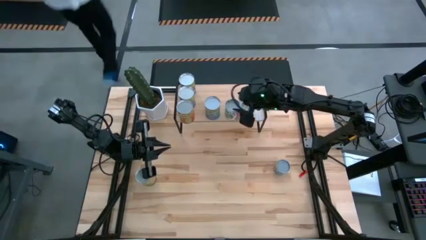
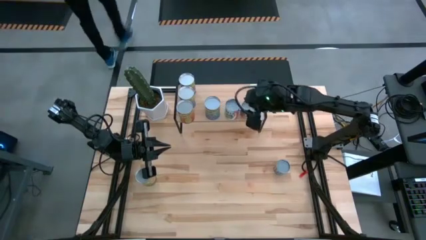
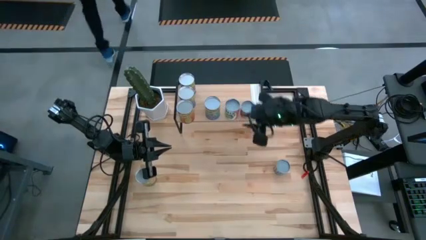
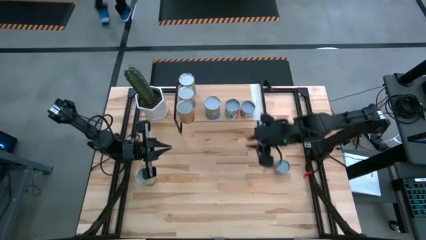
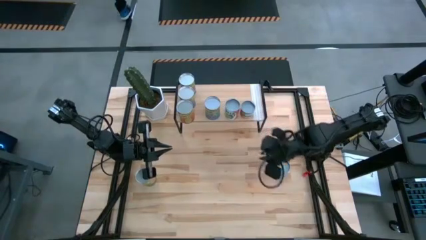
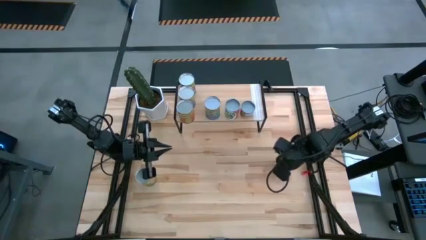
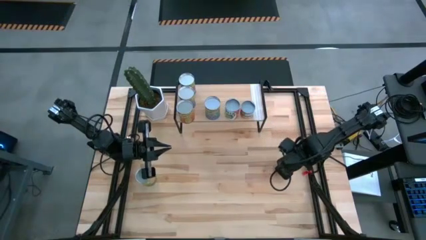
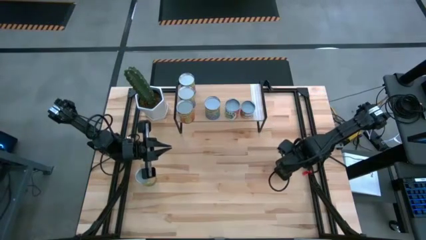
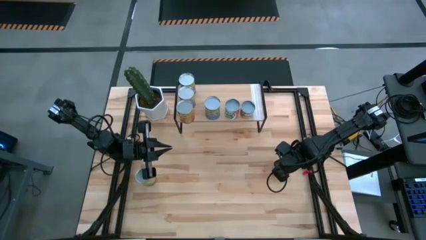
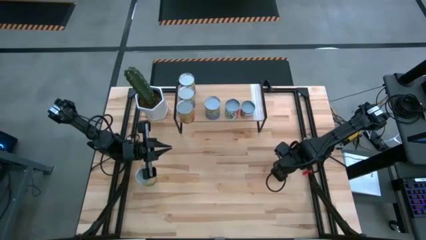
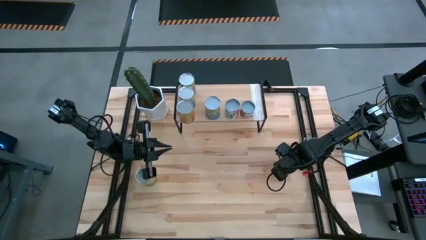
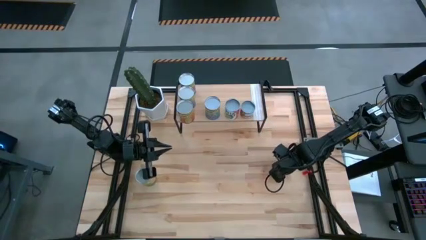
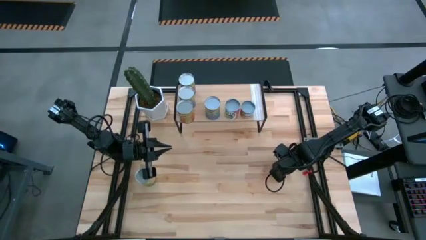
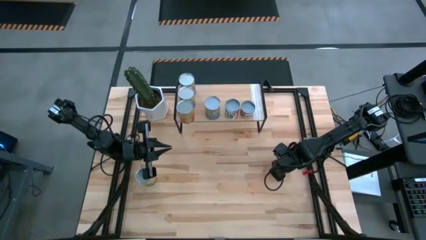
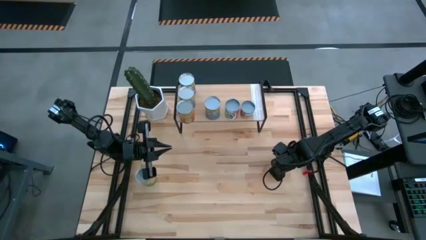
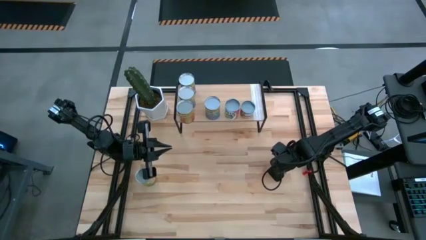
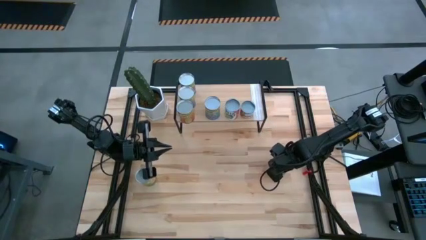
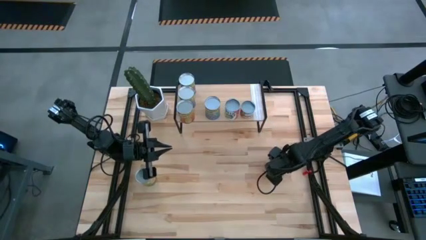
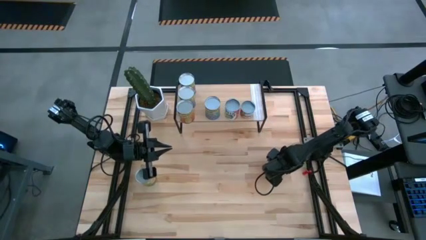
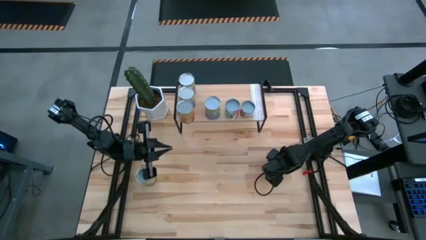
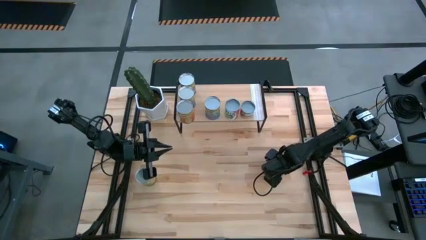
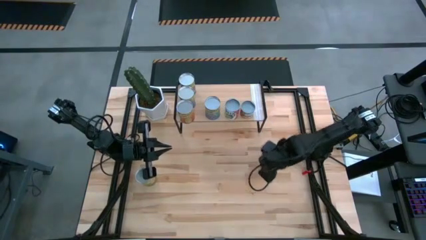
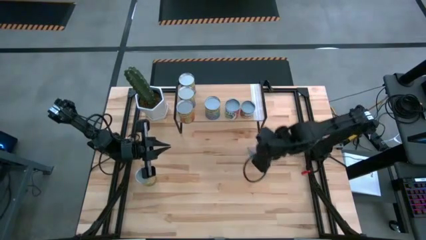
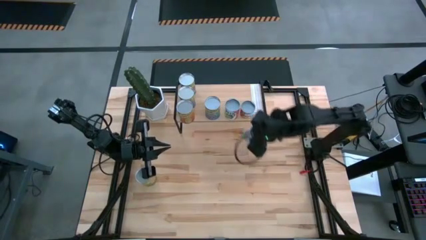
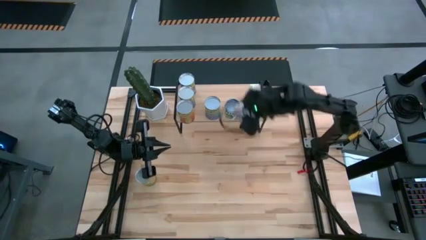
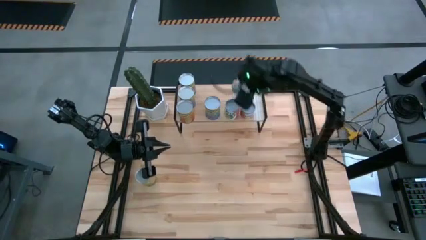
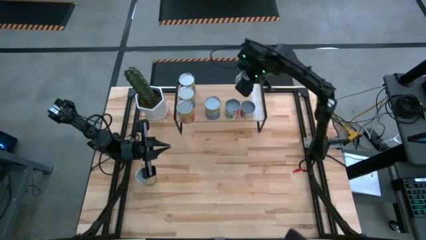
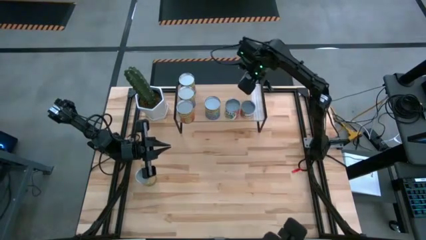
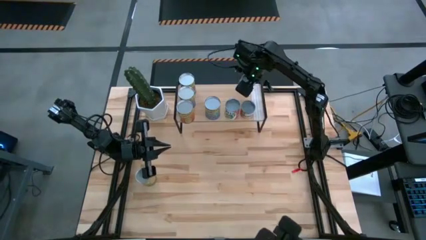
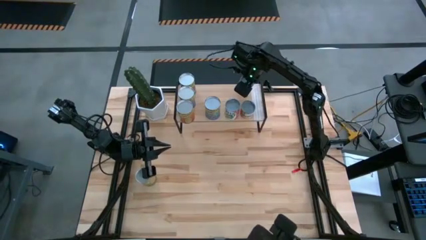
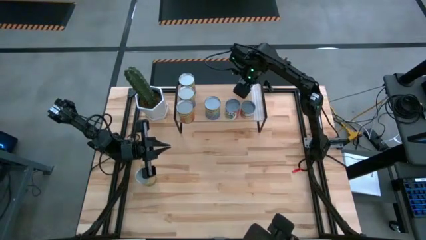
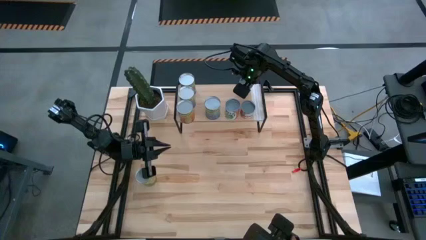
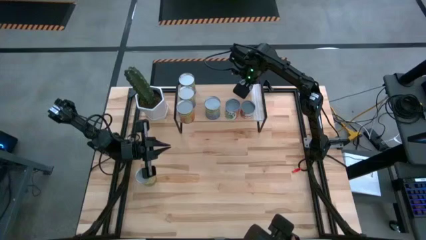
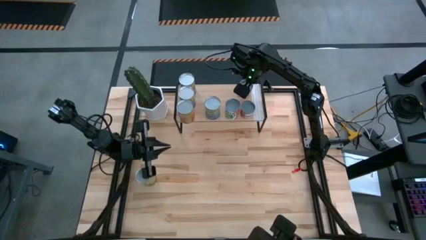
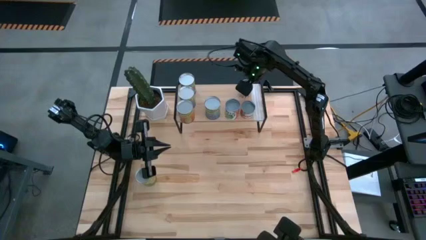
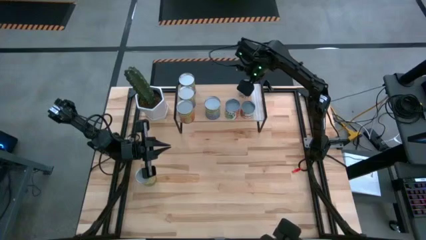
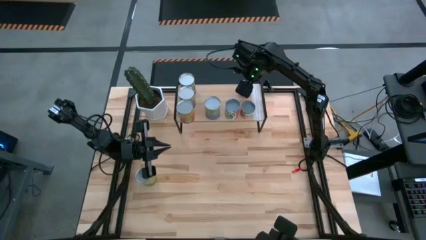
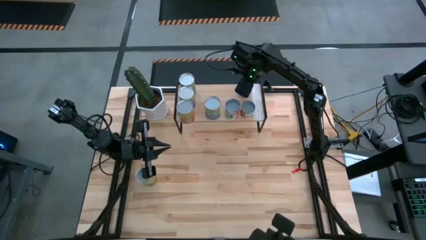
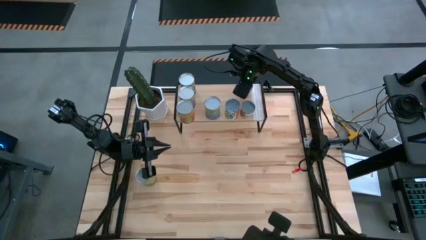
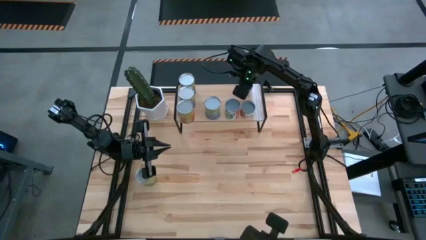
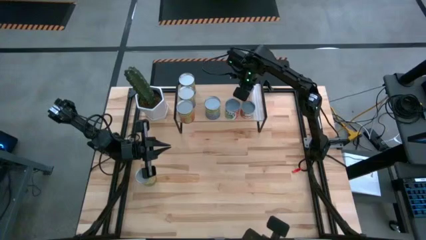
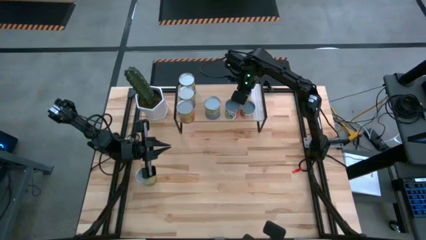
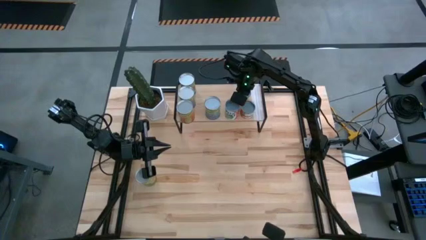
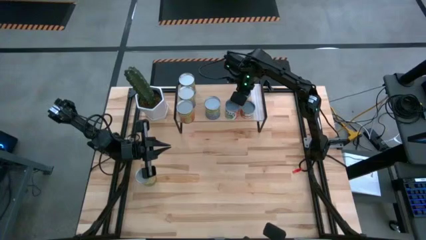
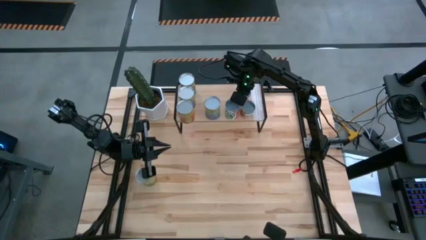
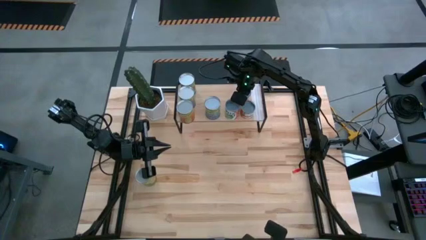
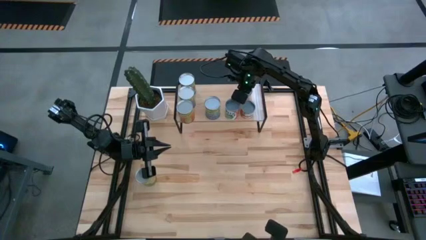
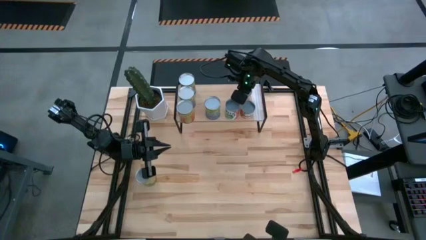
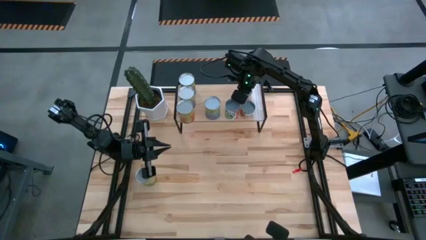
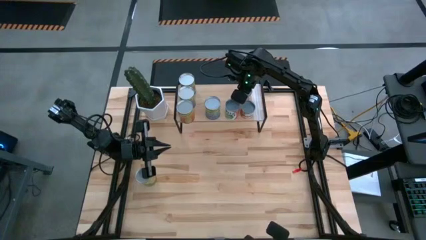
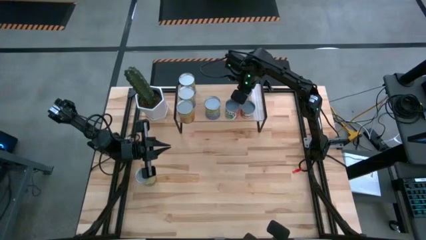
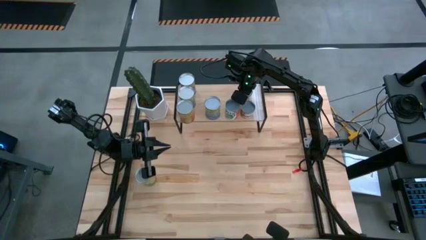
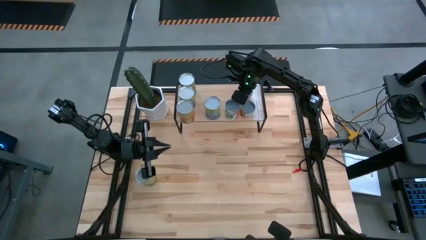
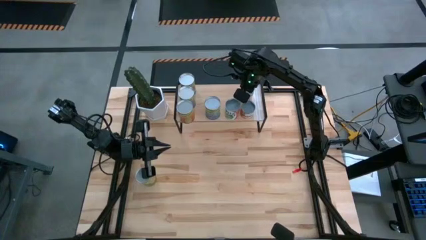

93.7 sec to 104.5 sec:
Task: Pick and place cans onto a shelf
Put the canned carrots can on the shelf

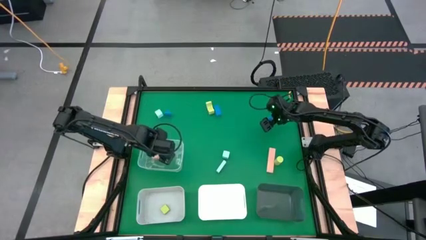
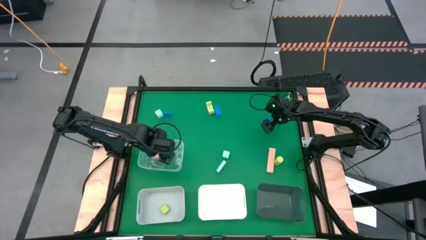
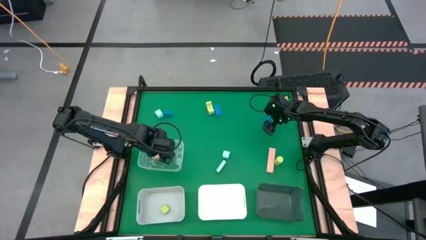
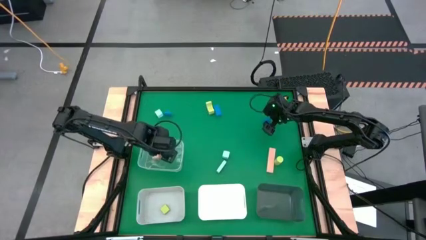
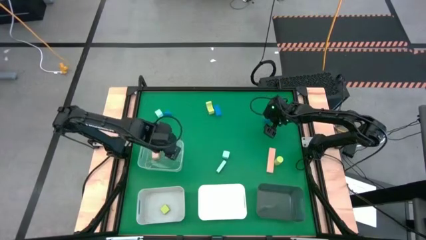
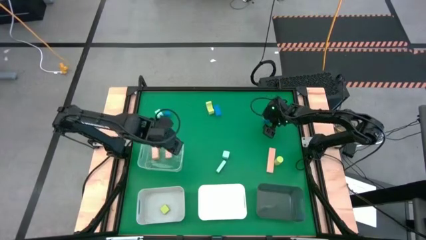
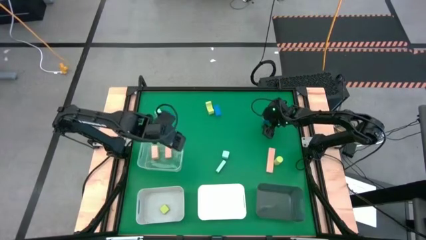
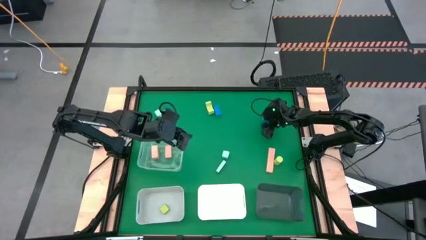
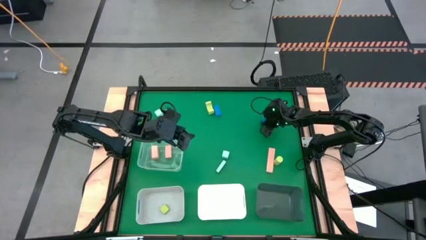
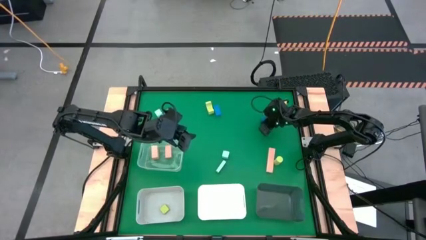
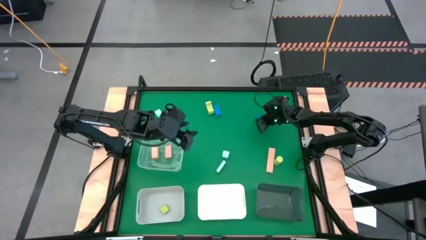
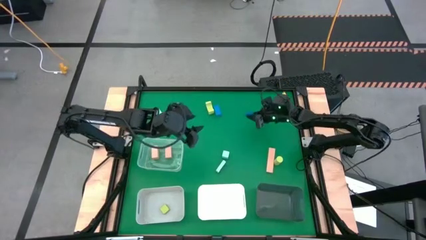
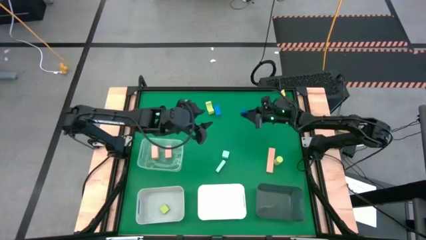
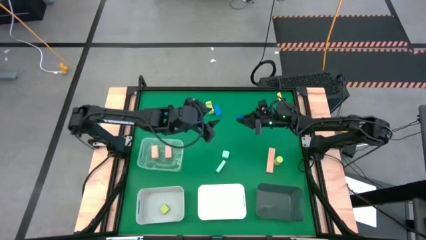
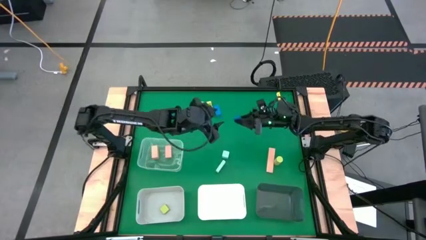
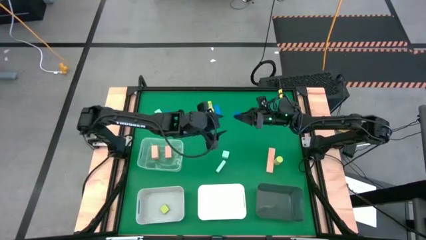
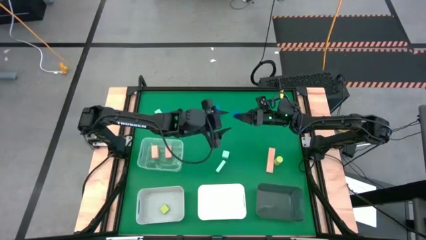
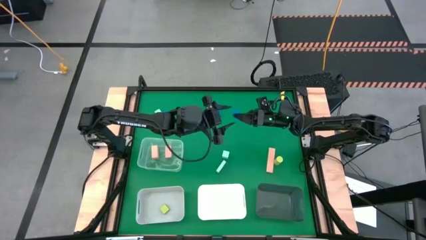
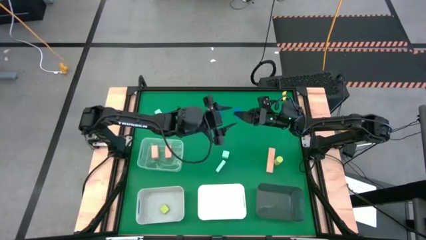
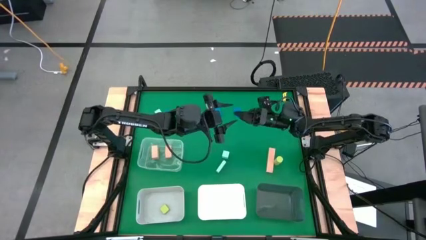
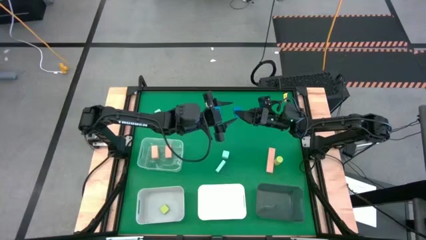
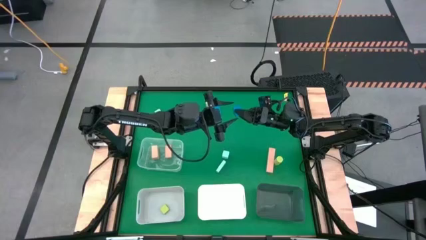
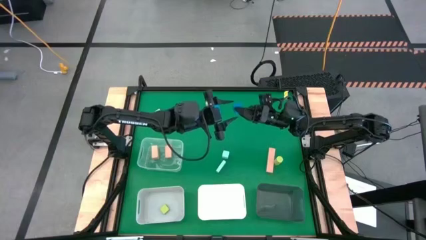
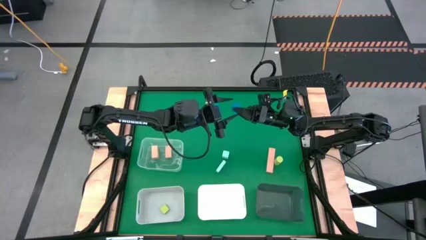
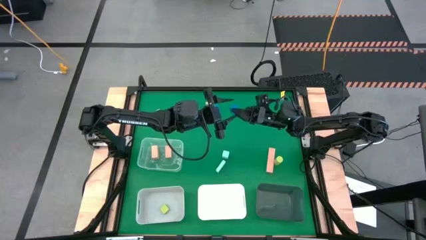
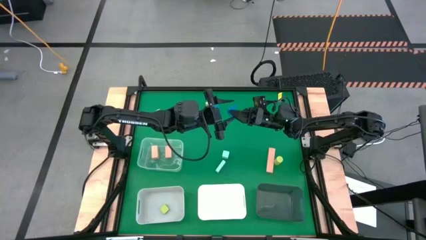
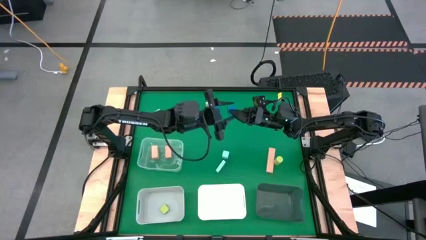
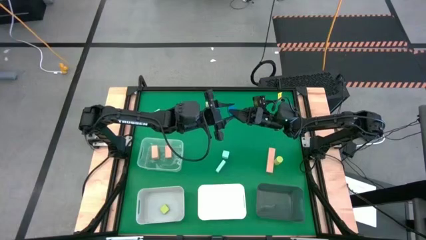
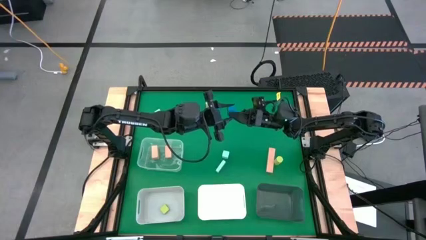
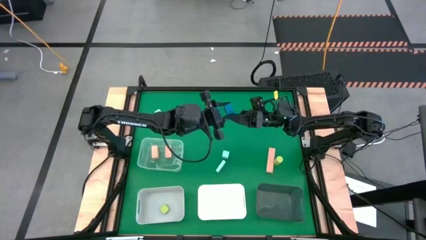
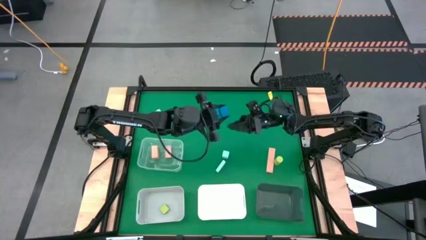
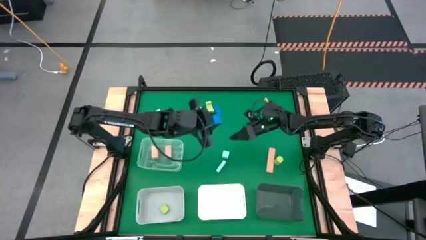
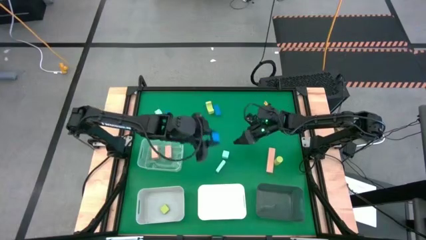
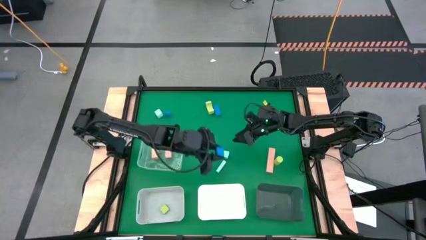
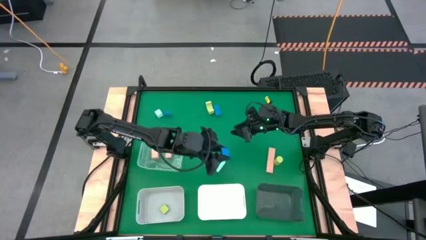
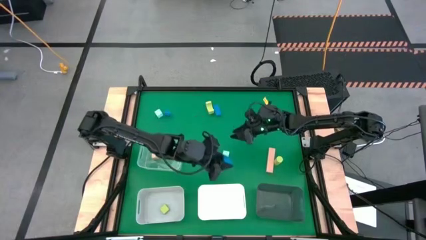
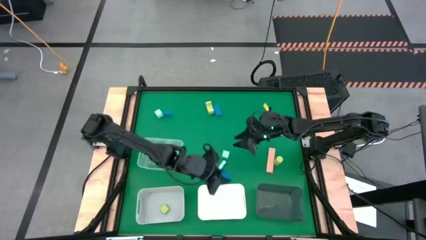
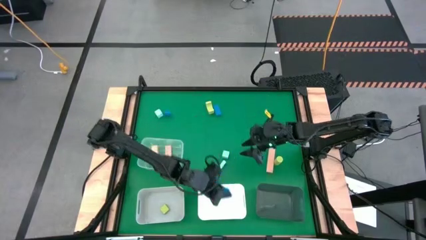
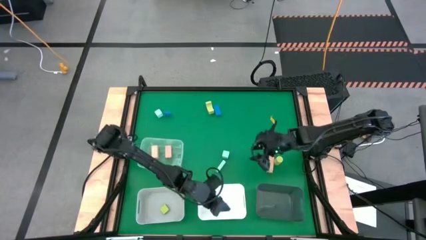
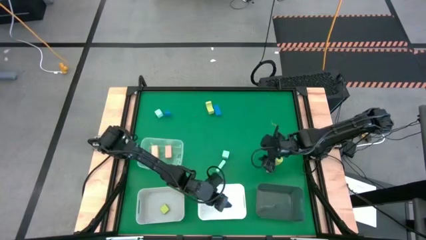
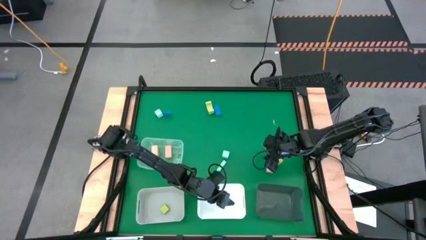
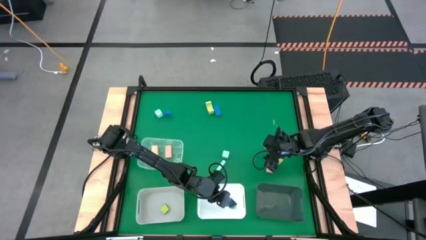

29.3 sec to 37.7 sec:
Task: Sort & place blocks by color
Put the right blue block into the white bin
